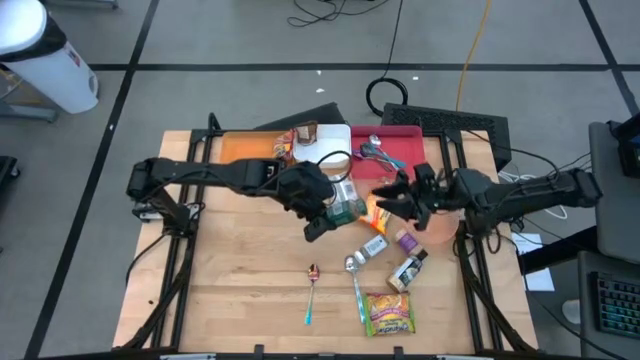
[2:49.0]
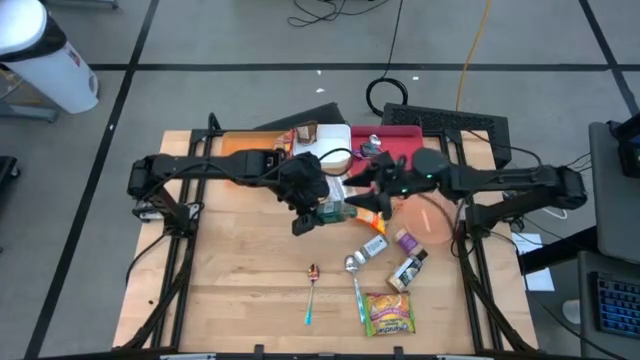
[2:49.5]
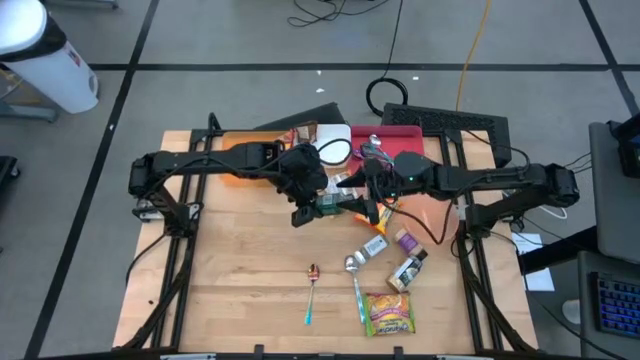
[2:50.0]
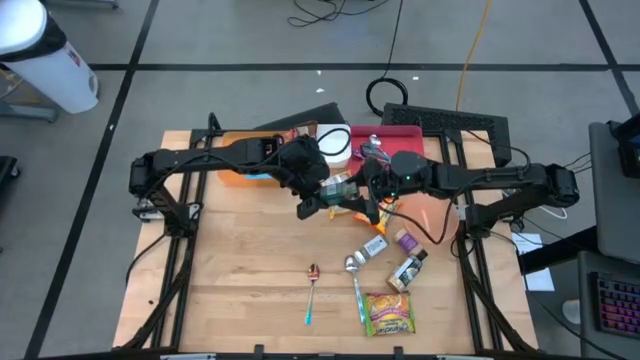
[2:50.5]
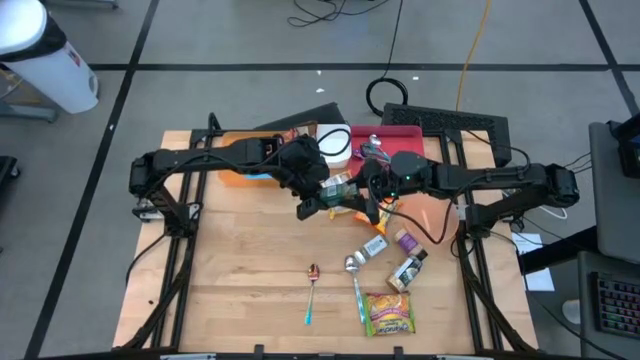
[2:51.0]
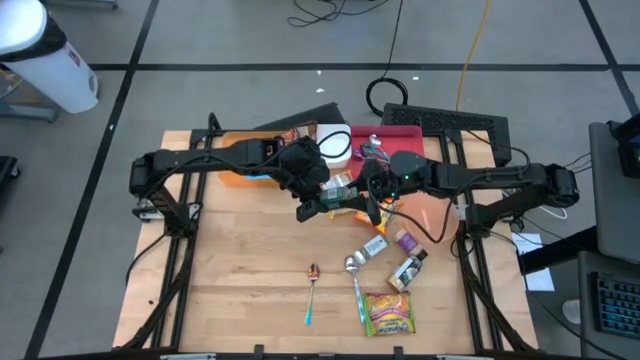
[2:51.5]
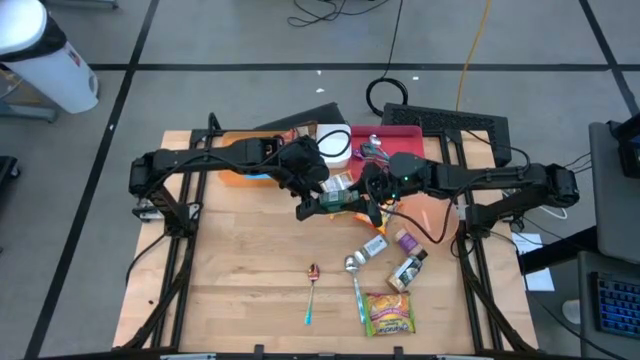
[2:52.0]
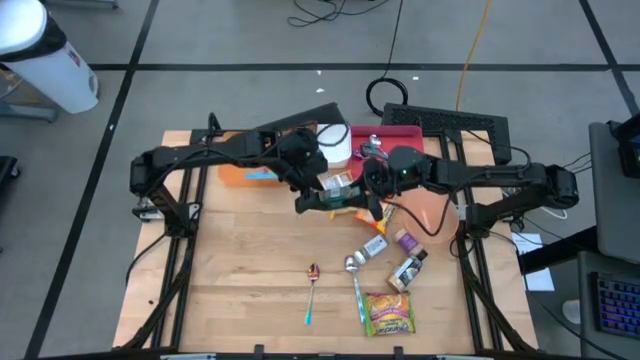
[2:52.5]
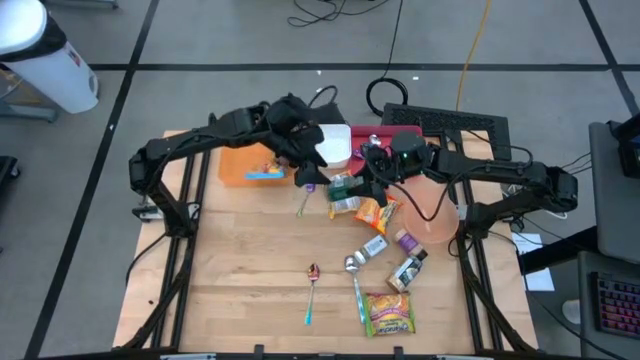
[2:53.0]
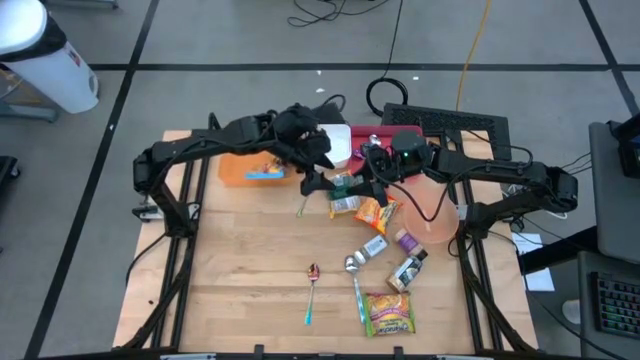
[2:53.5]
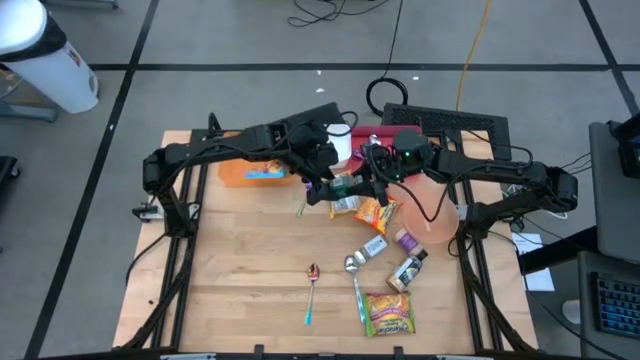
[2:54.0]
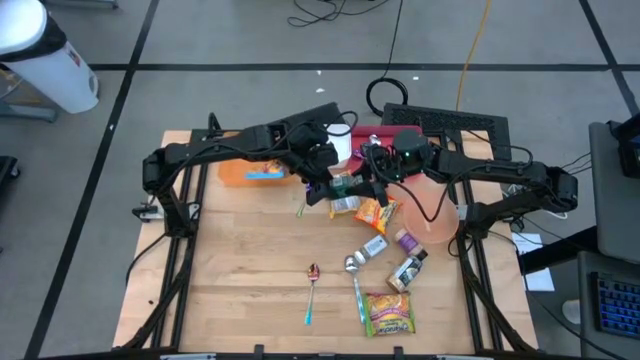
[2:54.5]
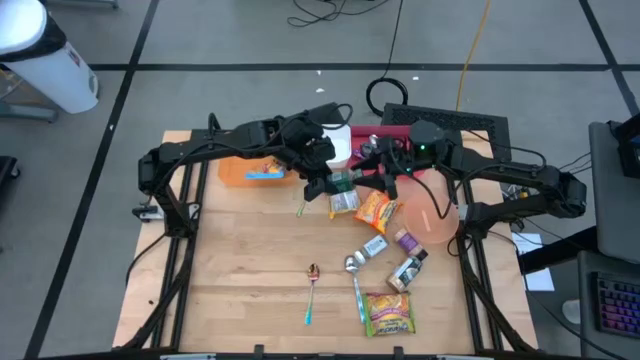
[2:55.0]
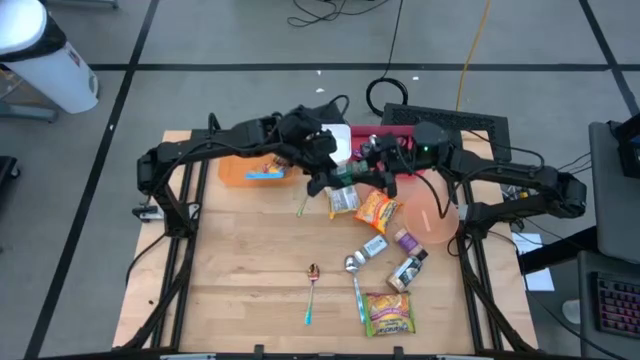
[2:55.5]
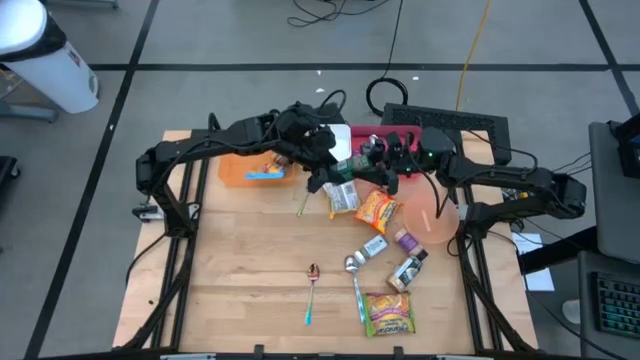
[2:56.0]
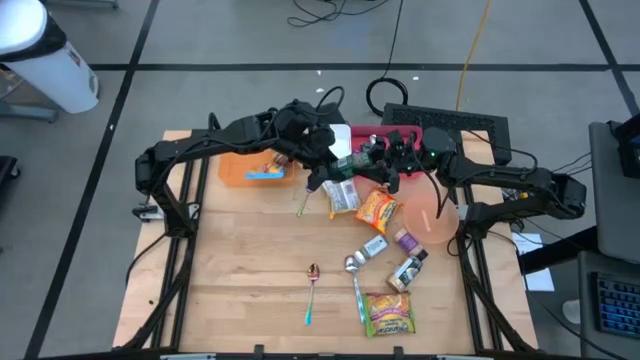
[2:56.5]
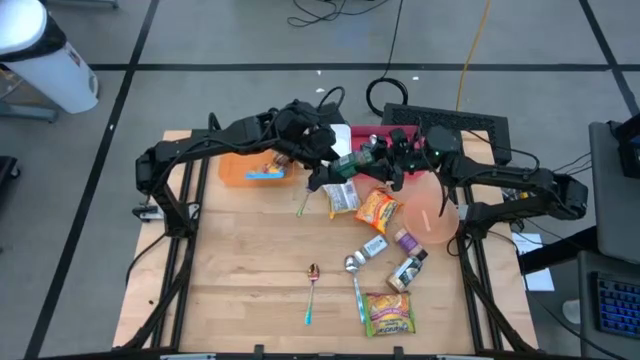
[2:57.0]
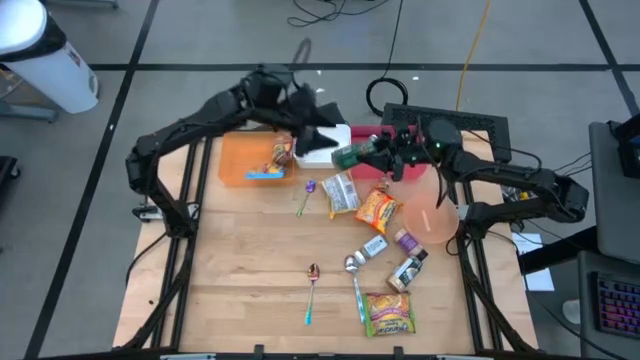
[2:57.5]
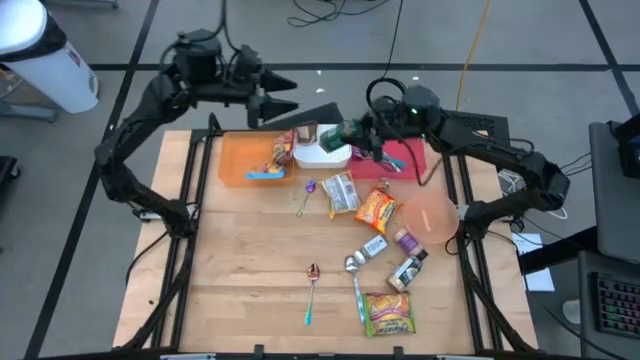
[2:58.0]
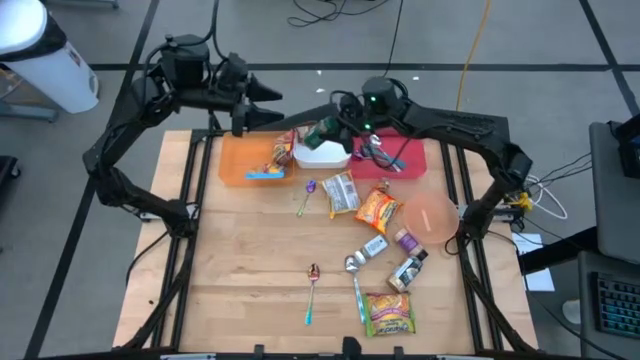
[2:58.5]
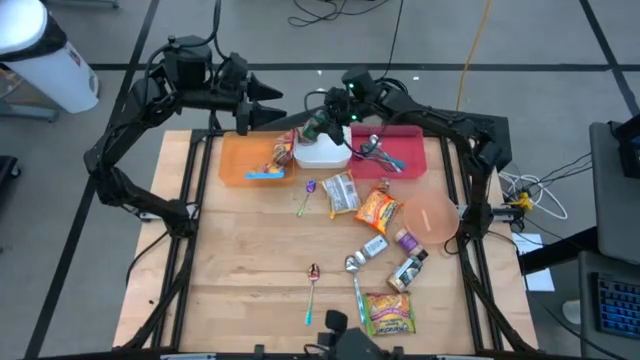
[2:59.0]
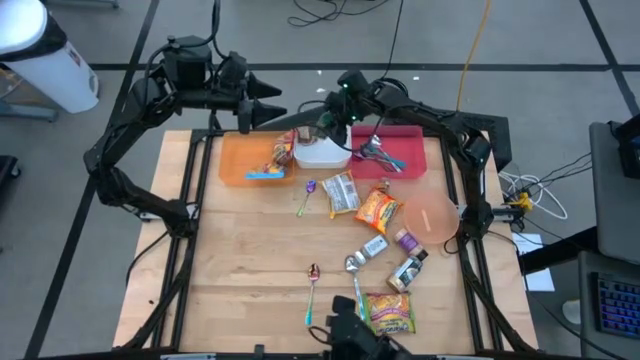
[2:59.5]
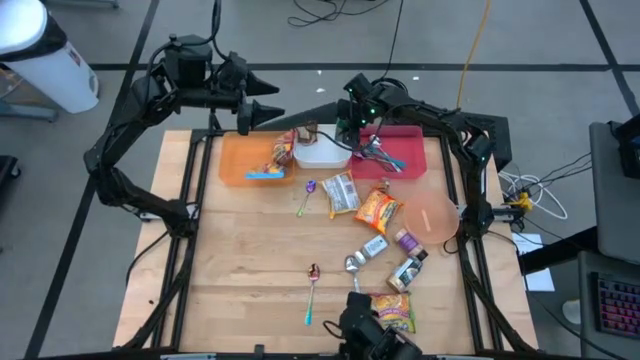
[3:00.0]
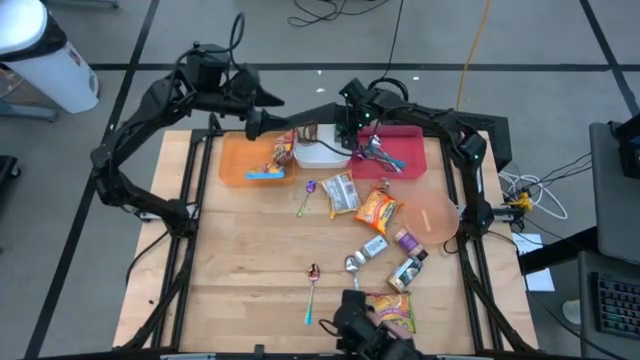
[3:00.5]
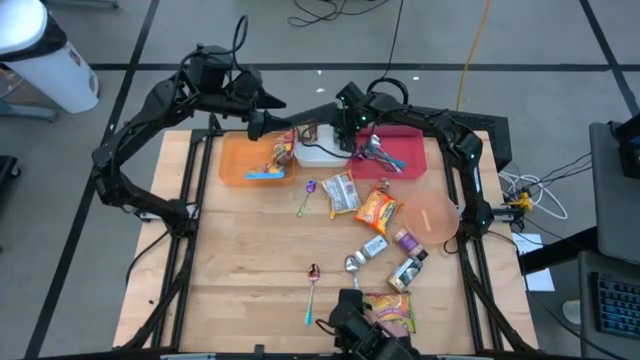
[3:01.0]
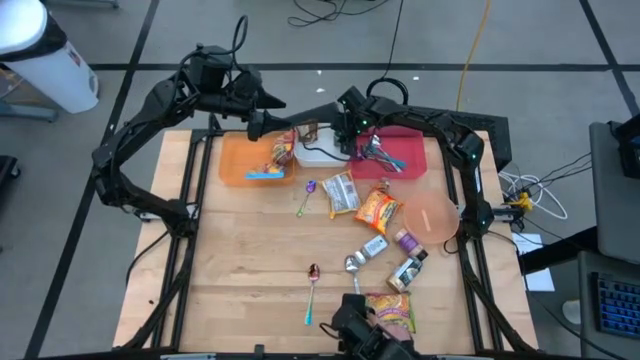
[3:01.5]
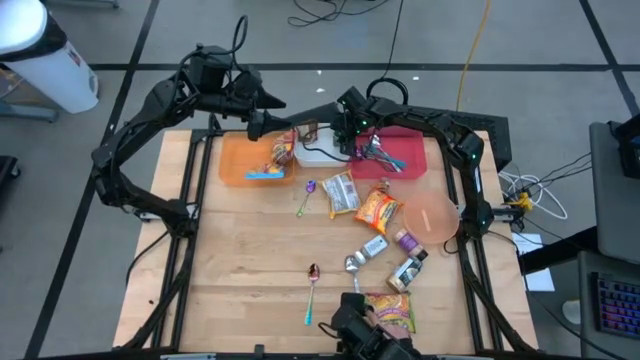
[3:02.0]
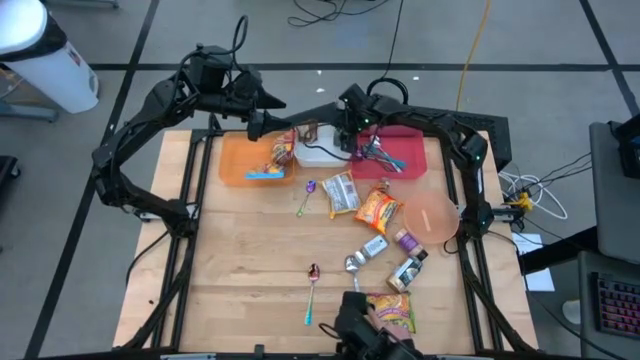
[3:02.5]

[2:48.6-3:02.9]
Task: Pick & Place Food Item
Put the green seasoning bottle into the white bin
